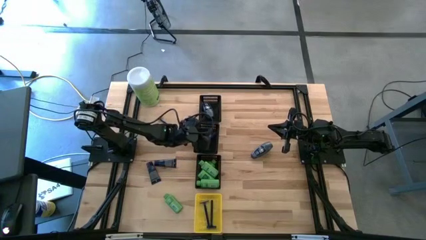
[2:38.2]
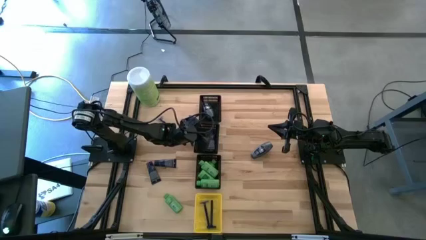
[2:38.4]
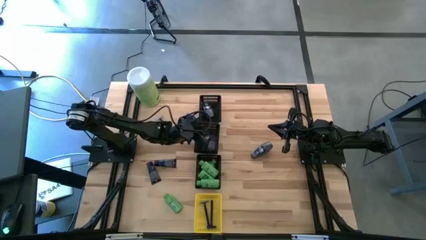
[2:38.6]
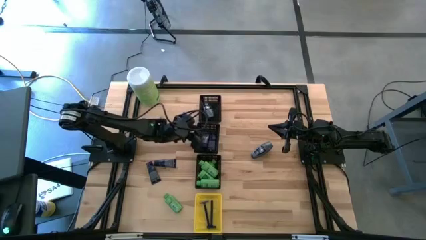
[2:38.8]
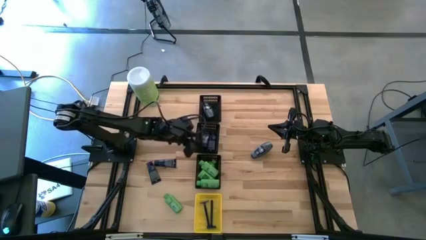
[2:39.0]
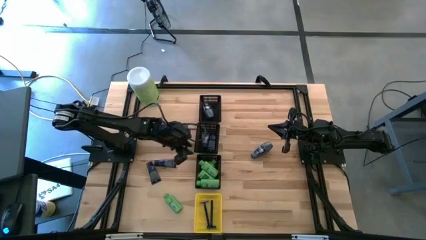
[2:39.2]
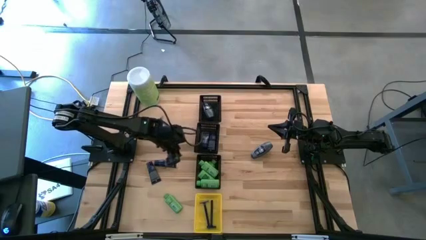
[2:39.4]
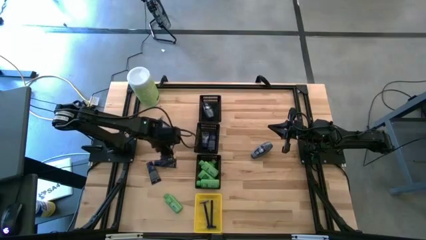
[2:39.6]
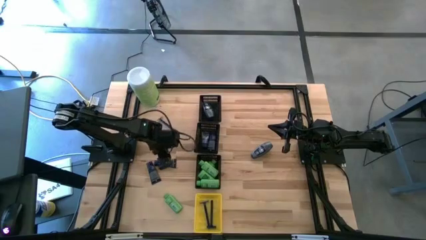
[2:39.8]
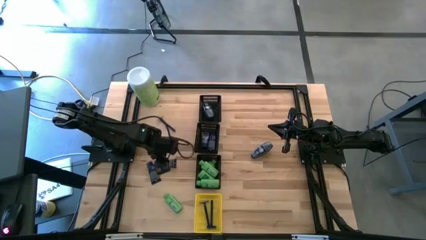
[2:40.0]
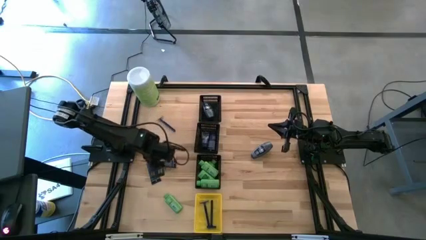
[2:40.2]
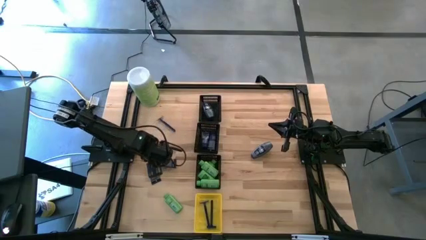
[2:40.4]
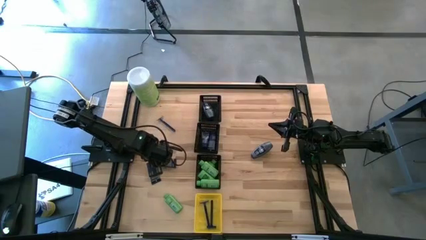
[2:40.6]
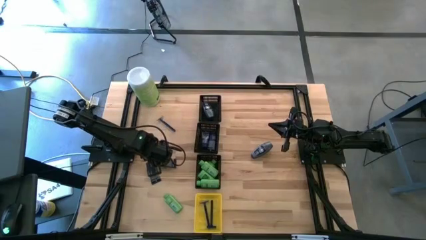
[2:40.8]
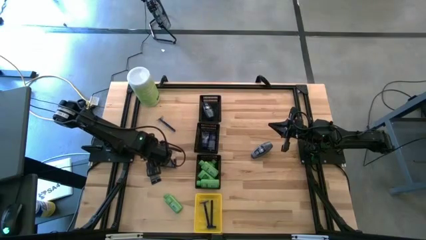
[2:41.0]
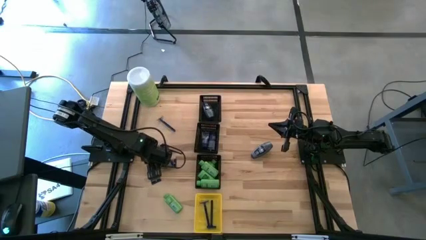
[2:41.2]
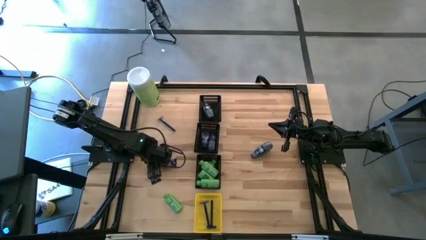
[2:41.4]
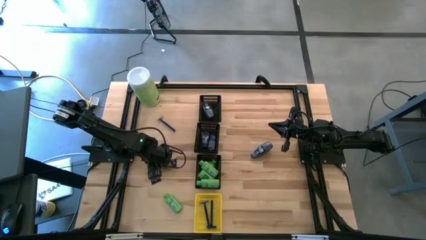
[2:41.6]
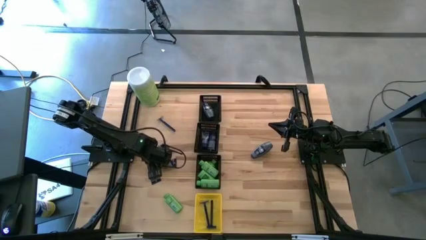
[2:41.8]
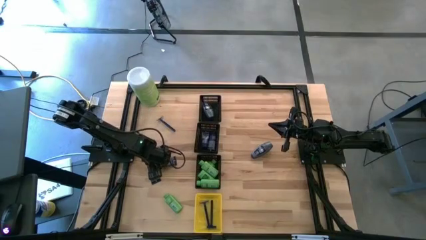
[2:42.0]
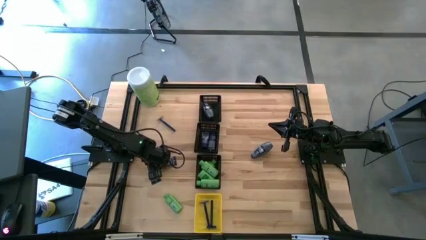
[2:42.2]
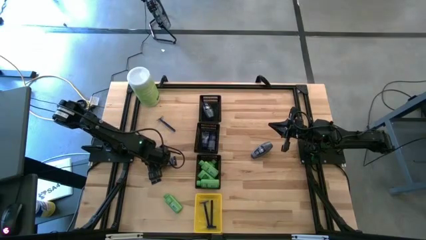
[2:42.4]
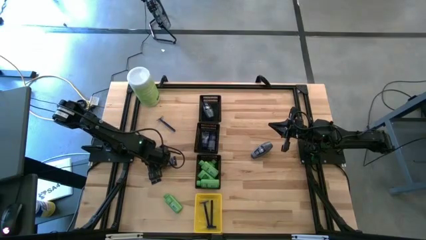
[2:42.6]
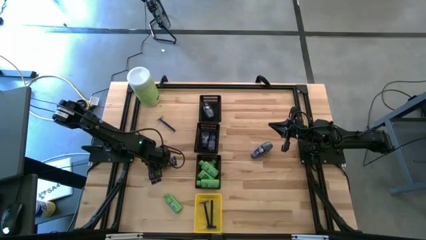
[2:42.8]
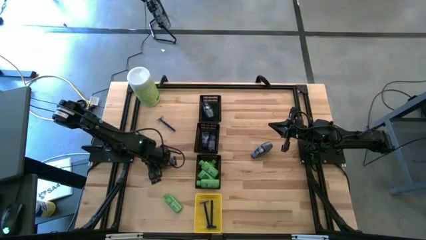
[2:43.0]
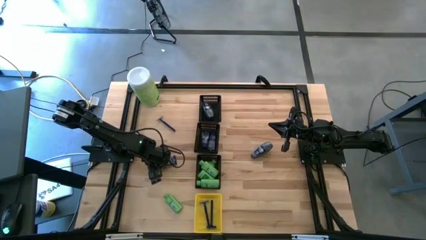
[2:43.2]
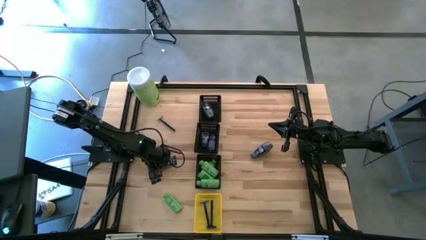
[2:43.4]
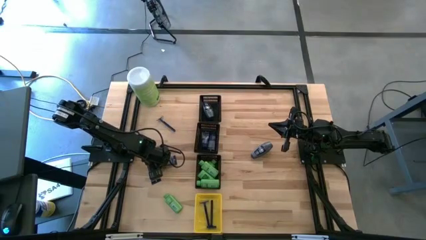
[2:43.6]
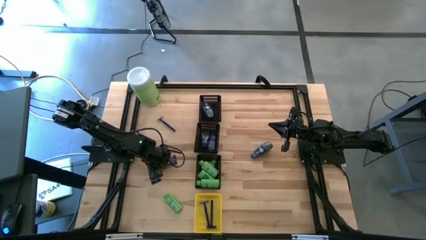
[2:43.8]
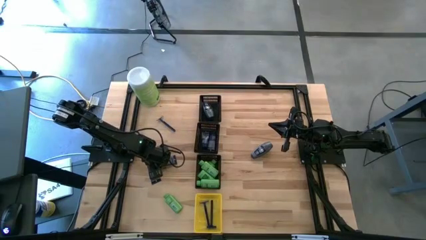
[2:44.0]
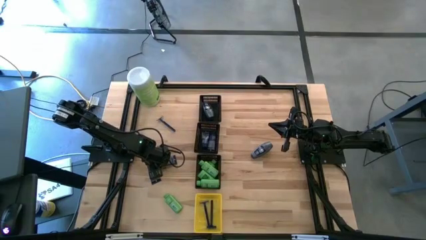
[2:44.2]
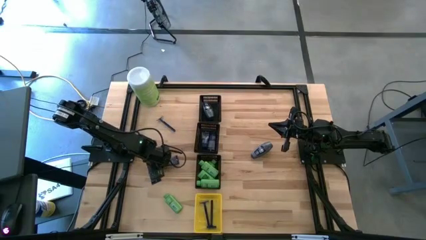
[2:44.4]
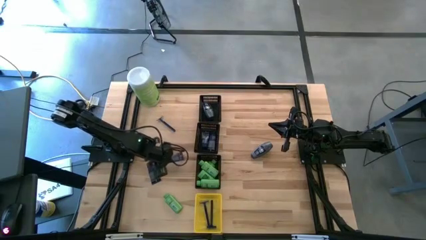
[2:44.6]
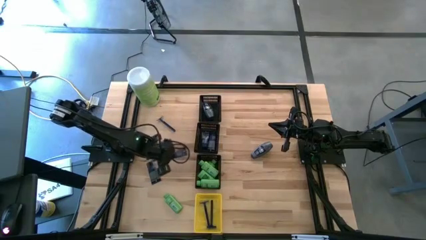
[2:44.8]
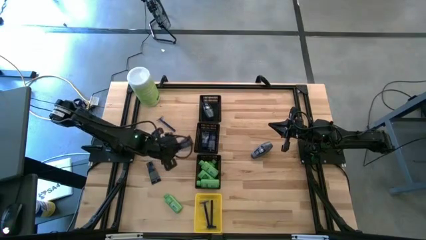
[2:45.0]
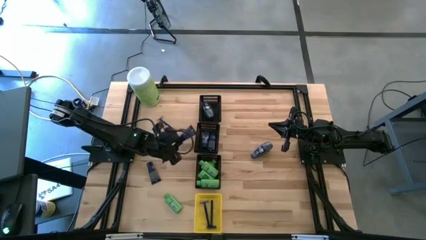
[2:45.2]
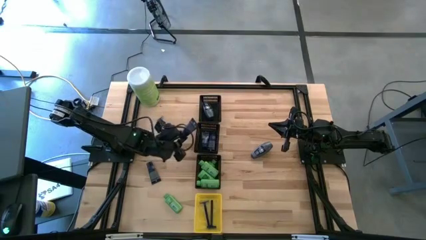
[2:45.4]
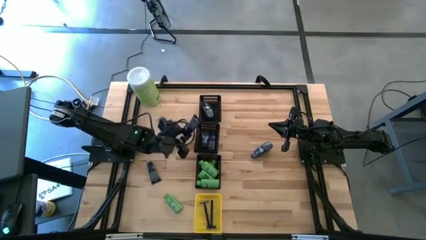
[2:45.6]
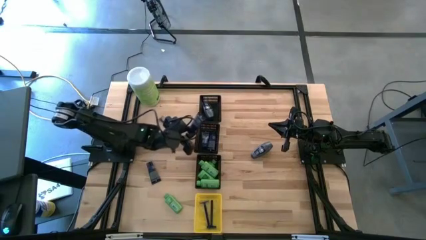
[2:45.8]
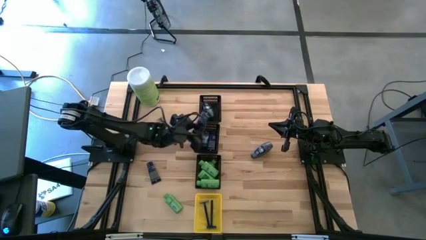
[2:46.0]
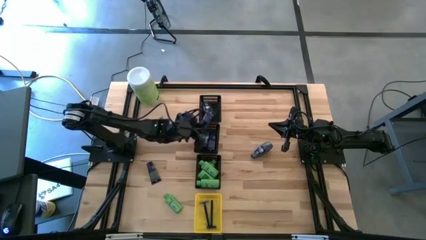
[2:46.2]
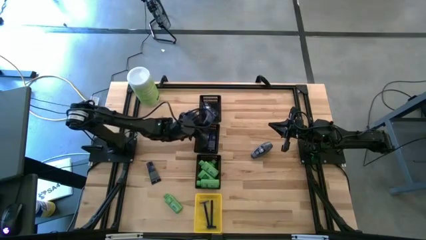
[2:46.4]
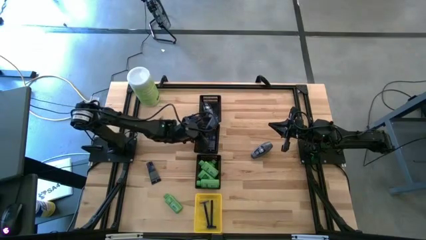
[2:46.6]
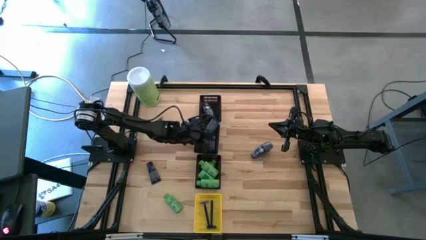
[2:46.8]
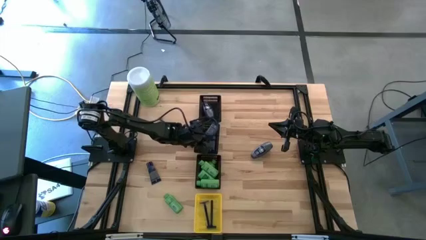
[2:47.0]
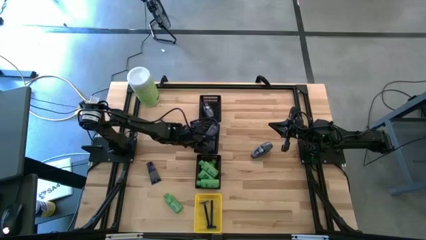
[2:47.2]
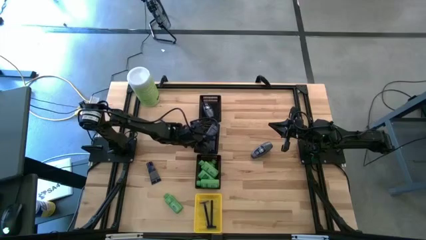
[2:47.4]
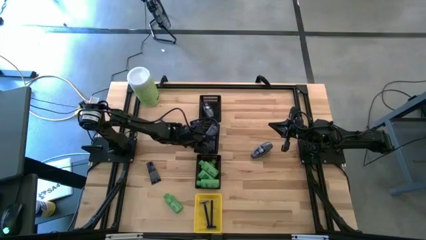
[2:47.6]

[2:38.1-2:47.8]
Task: Pick & Place Travel size toiletries
Put the dark blue shave butter bottle into the center black bin

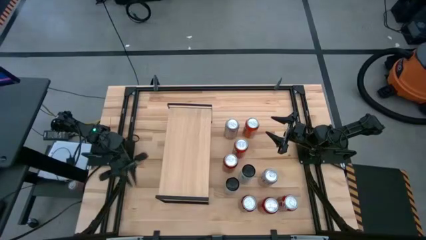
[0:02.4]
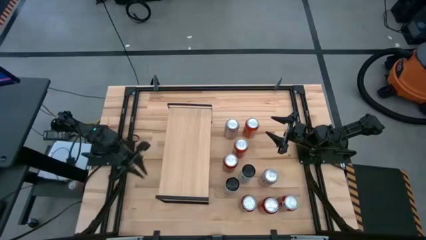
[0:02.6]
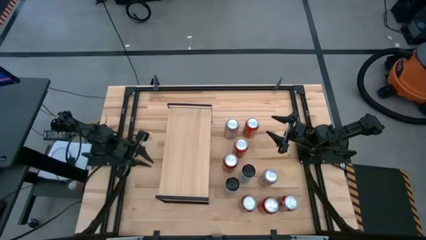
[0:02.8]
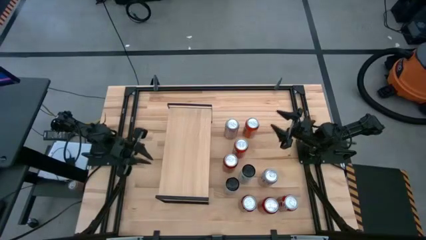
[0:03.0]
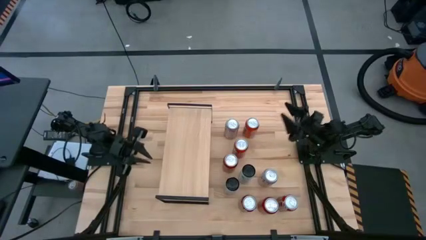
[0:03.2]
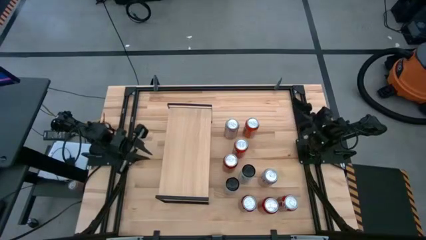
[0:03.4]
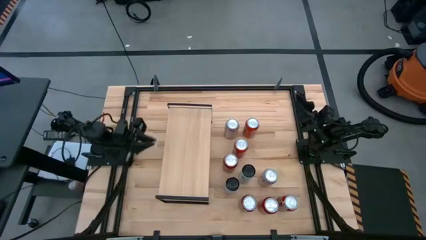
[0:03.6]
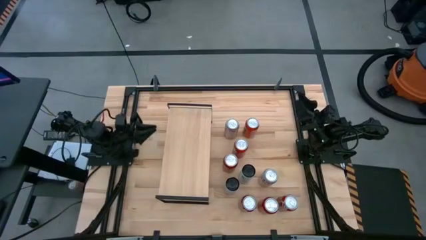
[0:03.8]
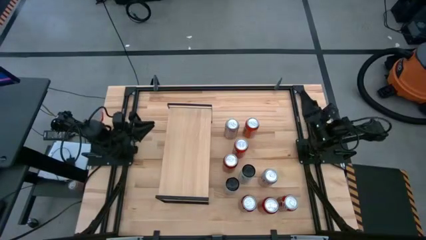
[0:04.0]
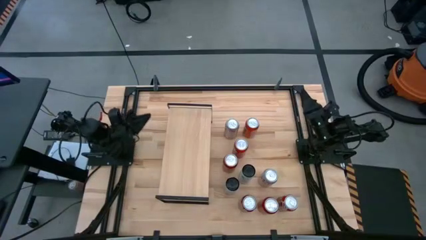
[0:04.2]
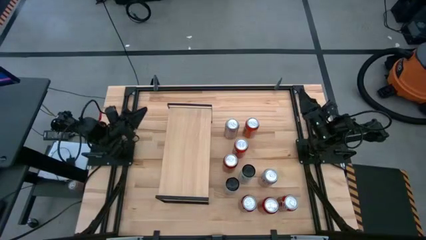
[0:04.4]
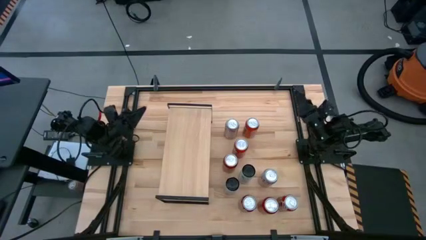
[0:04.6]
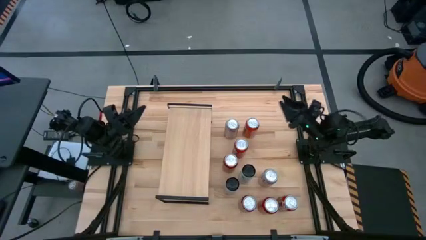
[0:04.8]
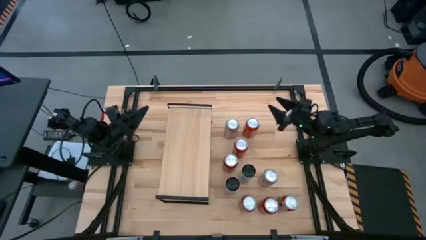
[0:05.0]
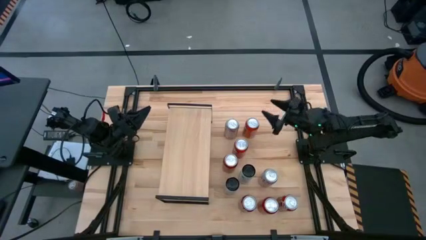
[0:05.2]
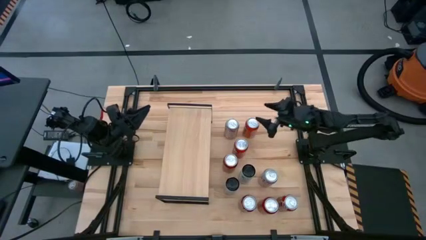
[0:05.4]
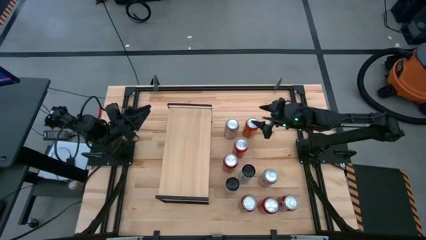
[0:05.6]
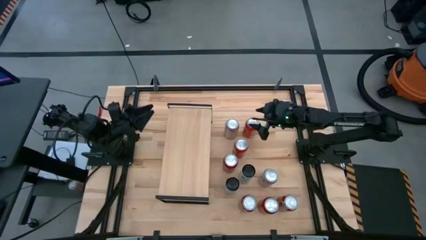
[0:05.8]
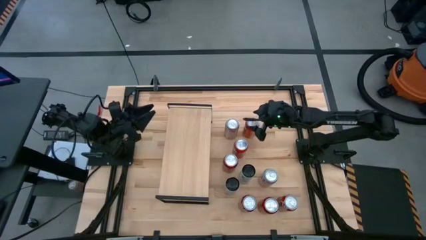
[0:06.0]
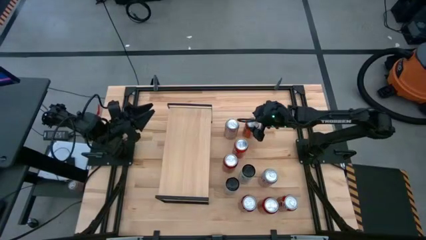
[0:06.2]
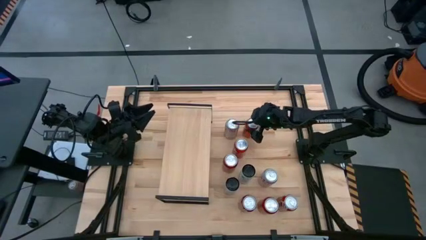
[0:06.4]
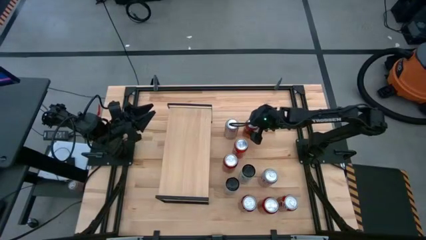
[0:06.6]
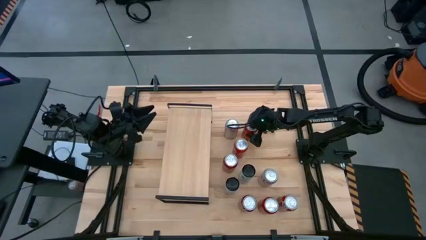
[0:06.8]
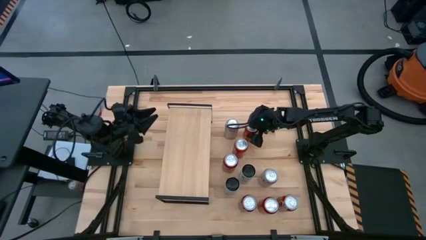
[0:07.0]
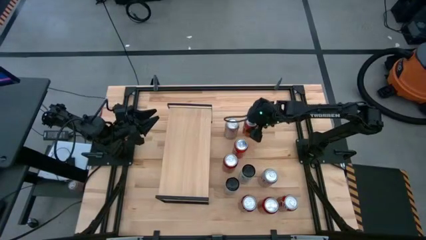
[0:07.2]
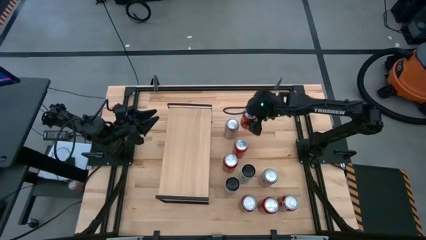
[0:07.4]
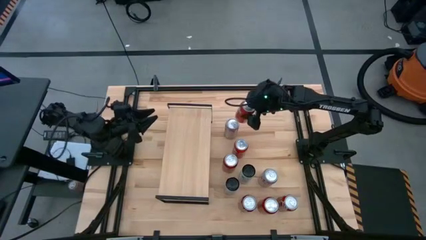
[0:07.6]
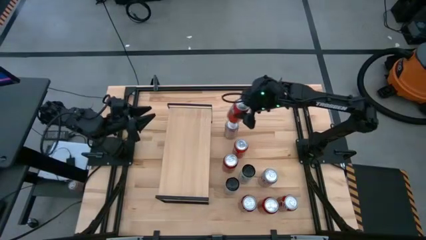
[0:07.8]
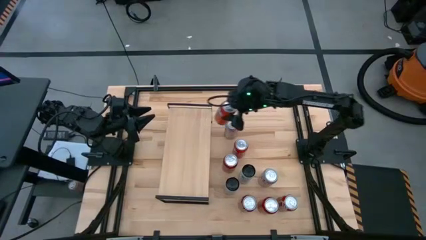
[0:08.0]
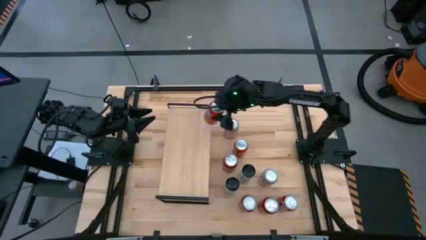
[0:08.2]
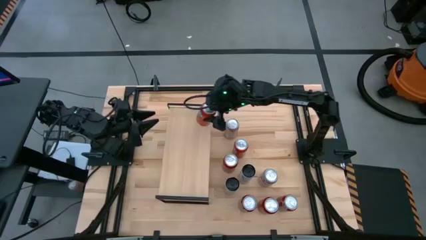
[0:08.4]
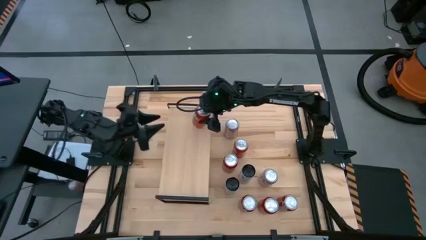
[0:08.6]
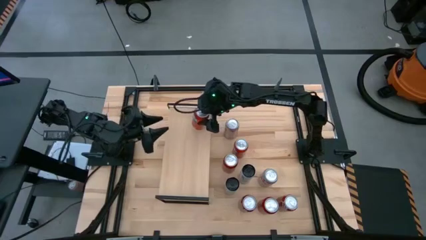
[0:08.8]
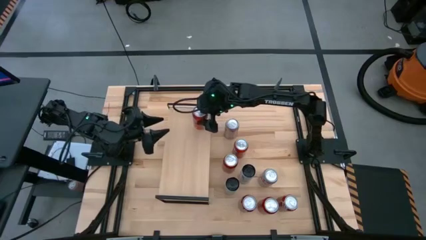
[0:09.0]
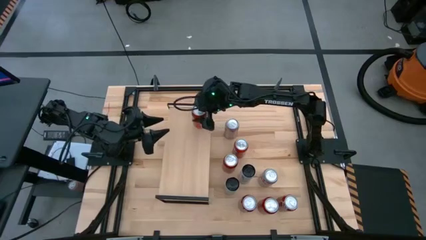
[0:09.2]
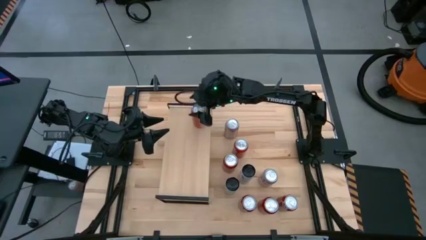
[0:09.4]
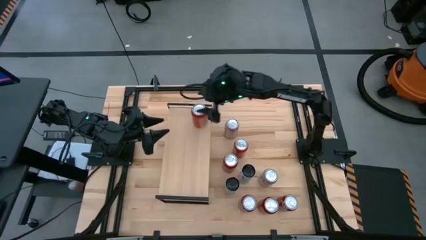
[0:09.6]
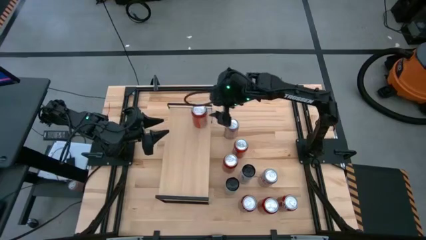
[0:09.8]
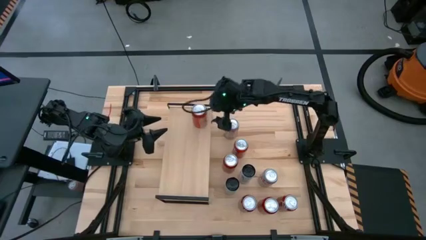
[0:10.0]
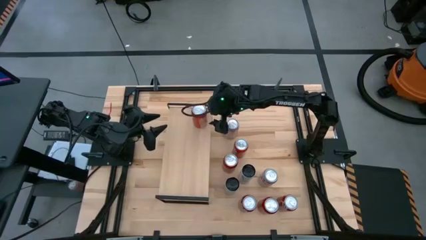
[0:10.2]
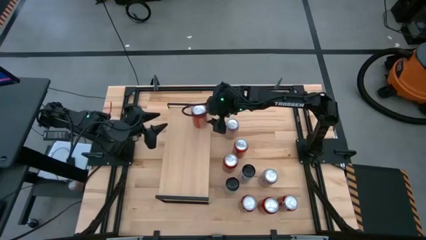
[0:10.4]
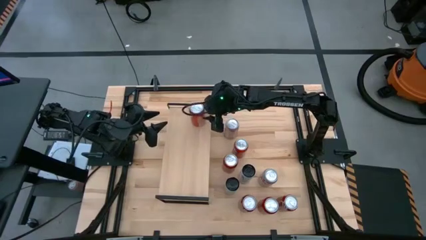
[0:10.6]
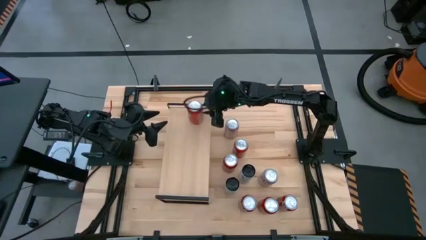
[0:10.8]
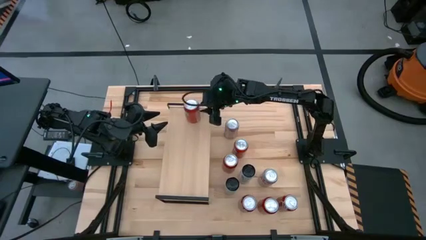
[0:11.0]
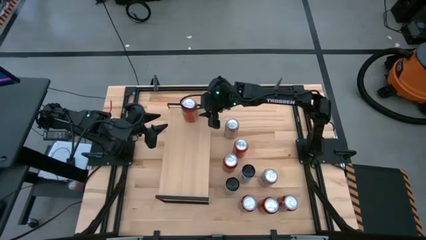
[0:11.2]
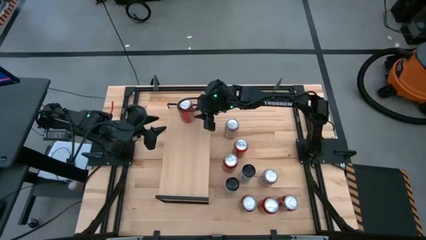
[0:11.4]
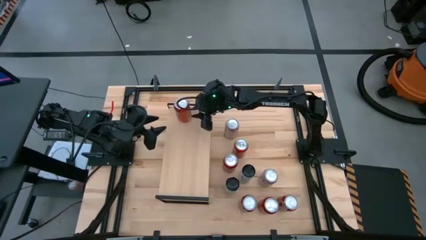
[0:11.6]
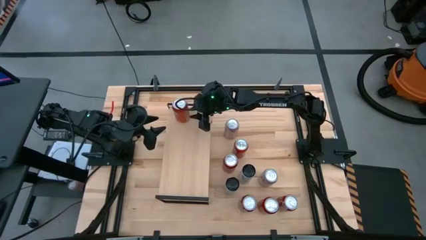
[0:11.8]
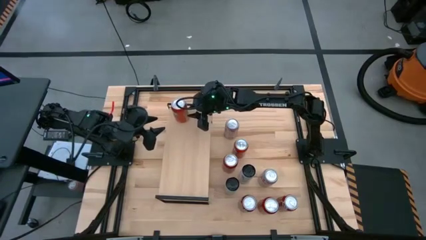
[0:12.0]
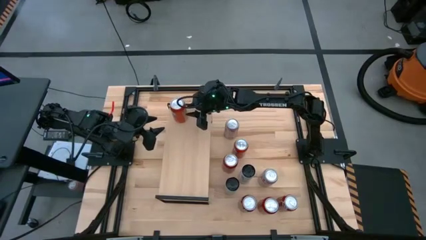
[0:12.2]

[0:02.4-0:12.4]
Task: Pick and place cans onto a shelf
Put the top orange can on the shelf
